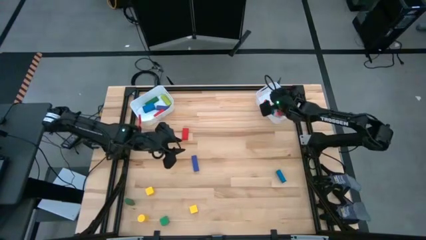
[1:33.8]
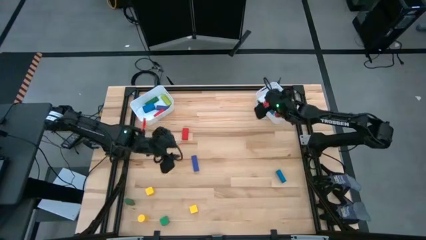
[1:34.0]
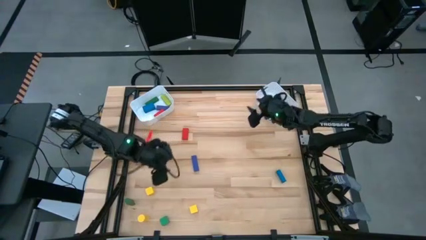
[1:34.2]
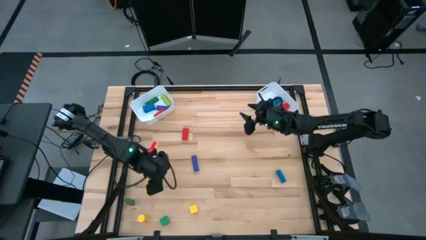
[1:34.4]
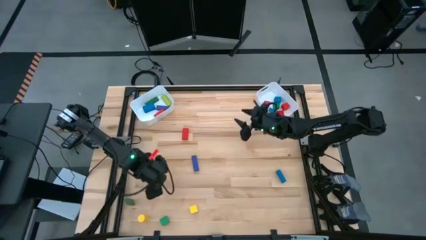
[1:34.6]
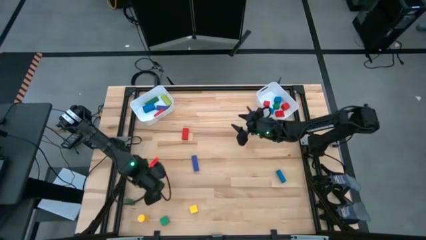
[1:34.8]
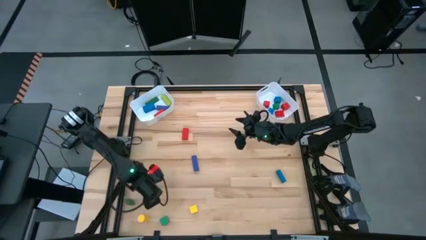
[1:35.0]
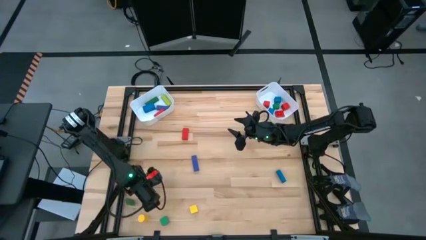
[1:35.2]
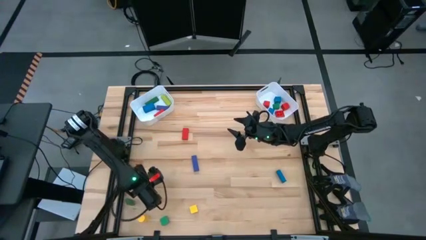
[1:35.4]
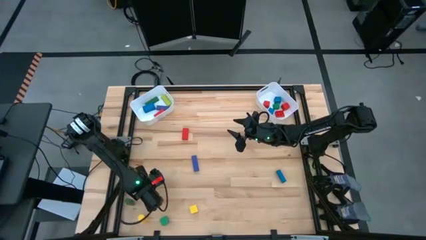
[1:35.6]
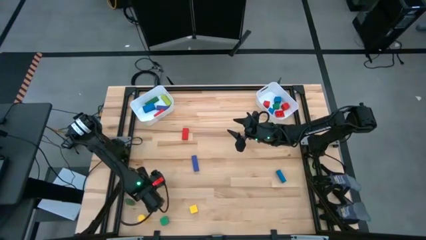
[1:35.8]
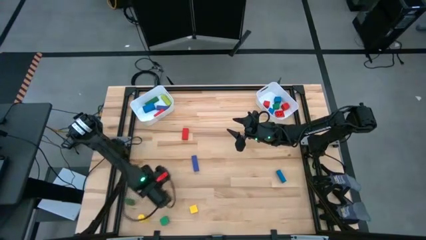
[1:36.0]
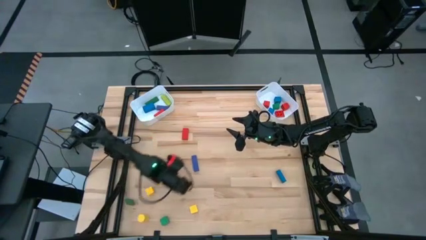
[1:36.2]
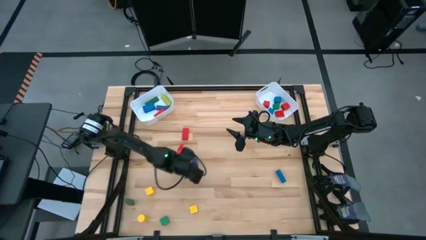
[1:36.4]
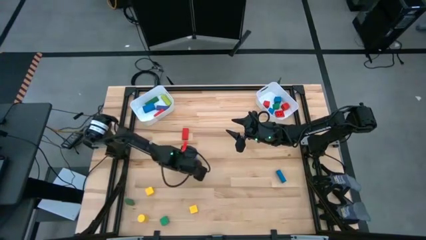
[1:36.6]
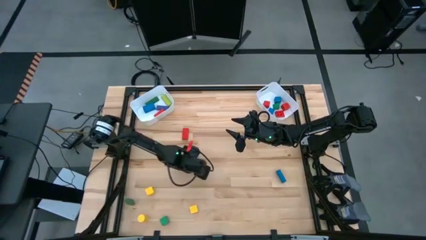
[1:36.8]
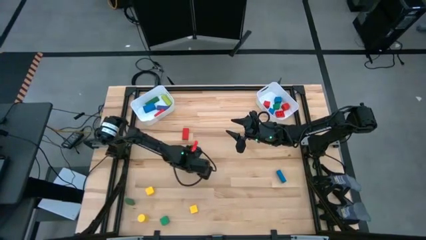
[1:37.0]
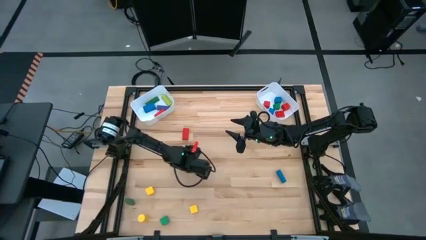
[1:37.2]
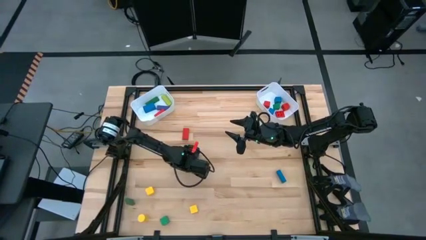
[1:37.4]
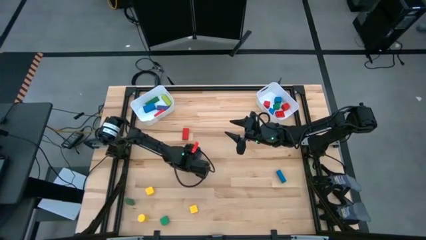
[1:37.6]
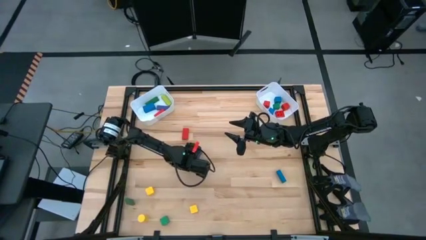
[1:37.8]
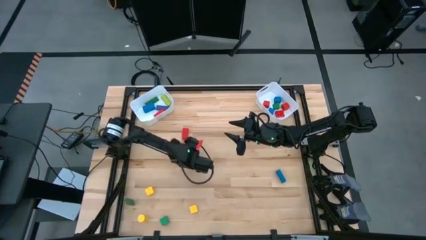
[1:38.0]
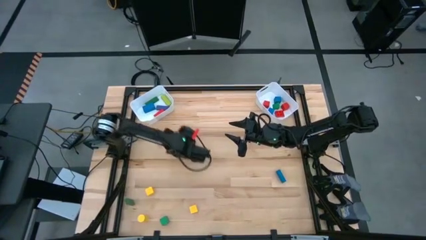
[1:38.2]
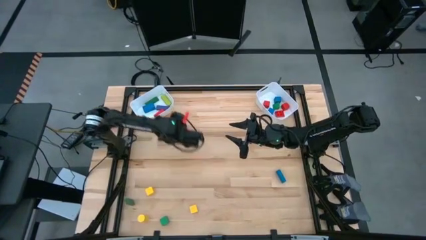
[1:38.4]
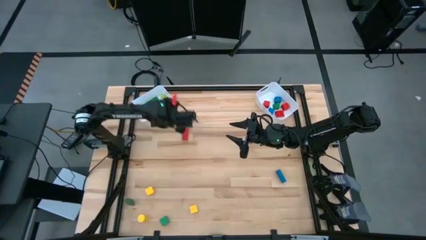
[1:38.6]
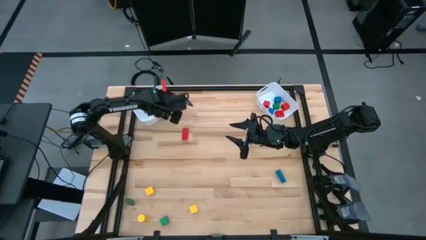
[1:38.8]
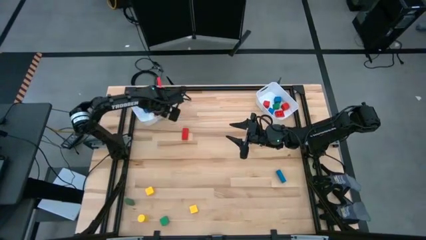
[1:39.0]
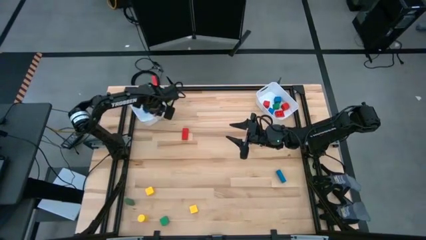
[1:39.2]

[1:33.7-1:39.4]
Task: Sort blocks by size
Put the large violet block into the left white bin

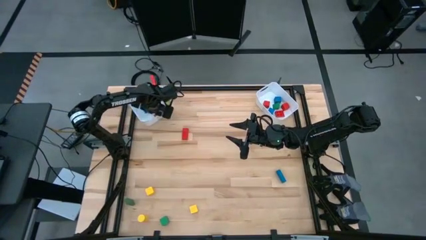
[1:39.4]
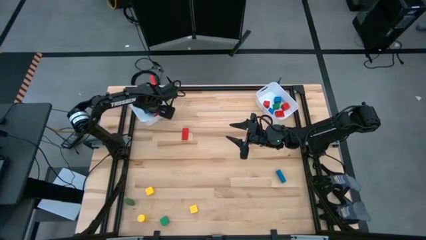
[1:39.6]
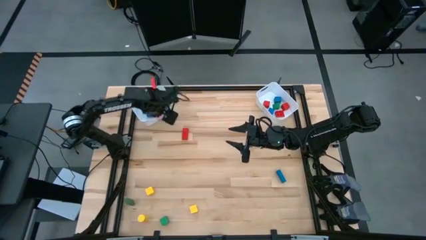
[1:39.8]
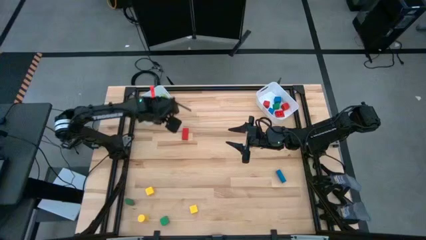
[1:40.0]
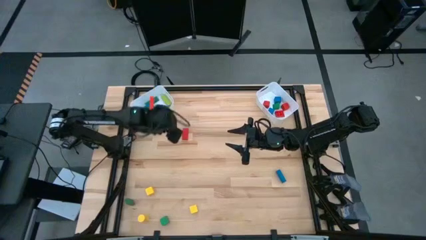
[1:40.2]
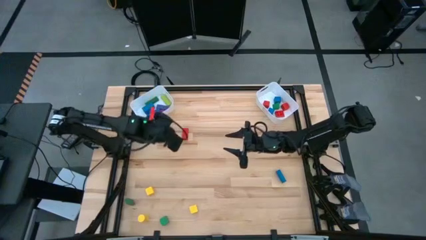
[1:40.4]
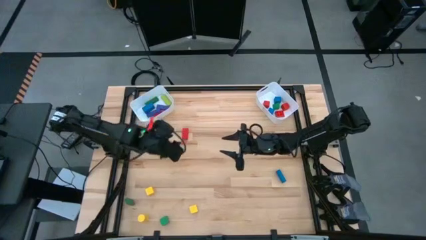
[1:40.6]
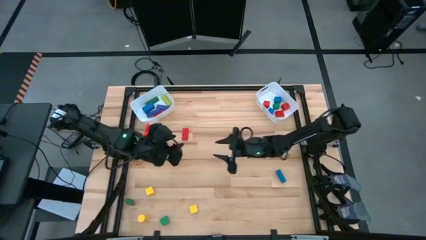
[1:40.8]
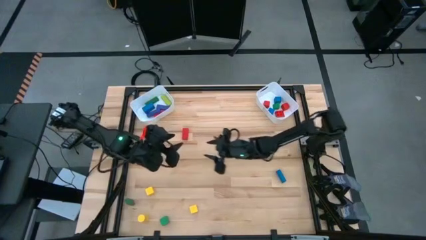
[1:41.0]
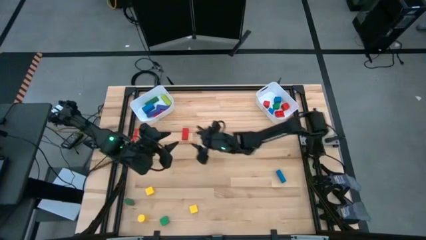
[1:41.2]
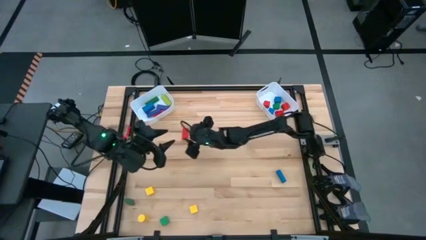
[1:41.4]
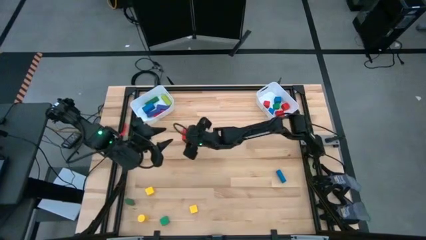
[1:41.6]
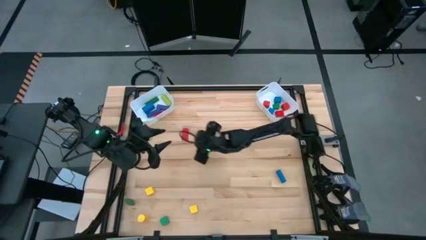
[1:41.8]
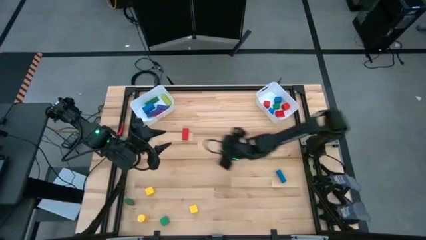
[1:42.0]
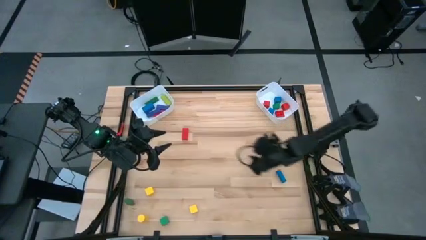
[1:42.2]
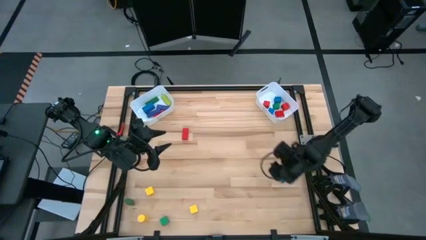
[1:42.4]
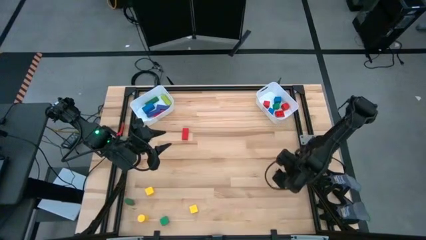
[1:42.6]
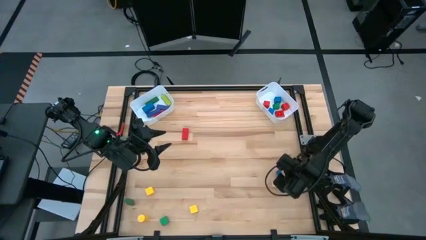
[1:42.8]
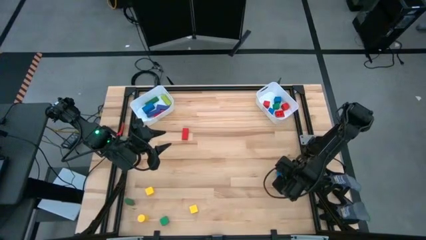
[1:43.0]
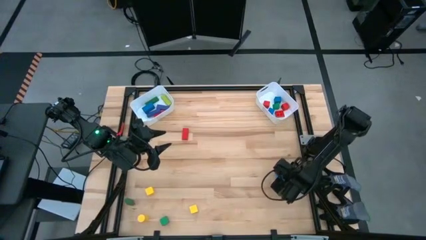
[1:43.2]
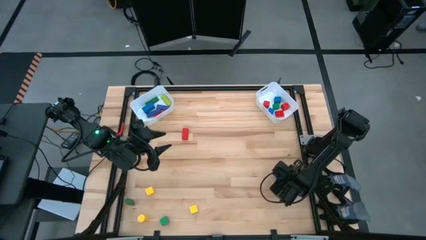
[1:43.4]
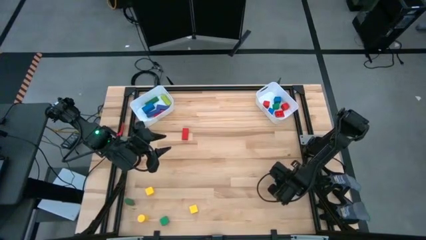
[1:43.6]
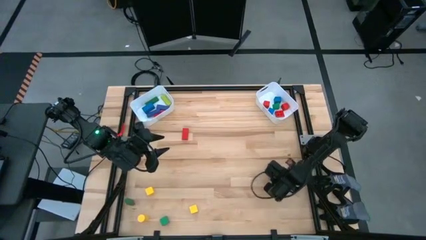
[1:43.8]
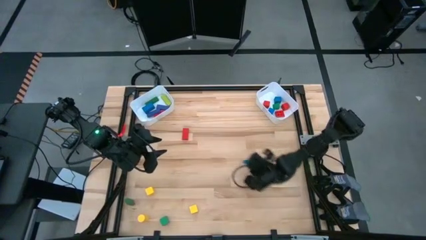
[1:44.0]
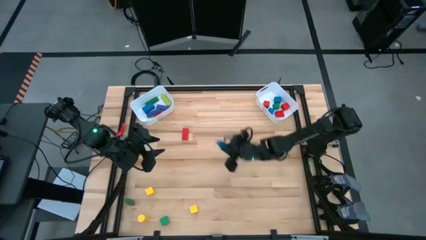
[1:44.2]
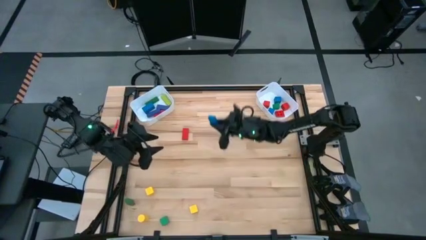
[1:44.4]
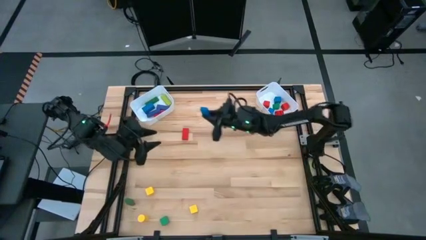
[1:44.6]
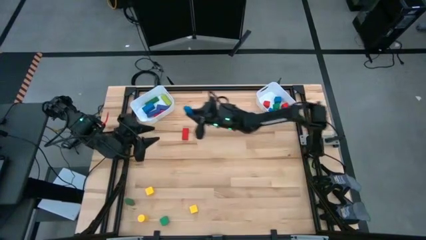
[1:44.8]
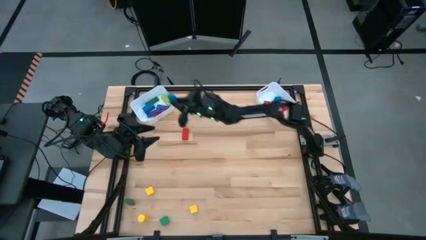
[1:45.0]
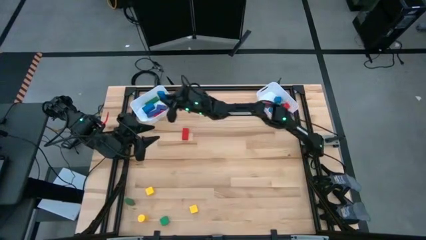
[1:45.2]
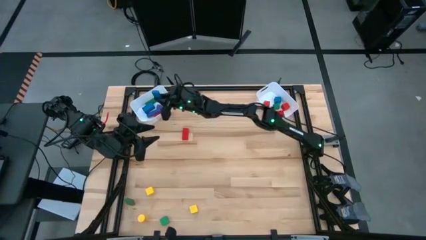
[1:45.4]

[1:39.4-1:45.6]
Put the large blue block into the left white bin

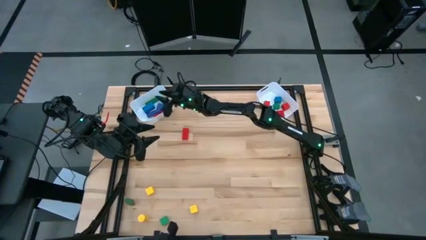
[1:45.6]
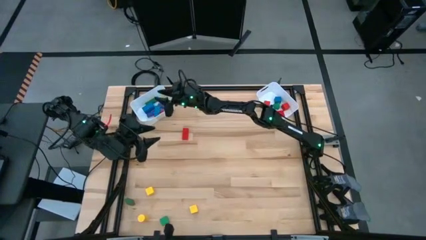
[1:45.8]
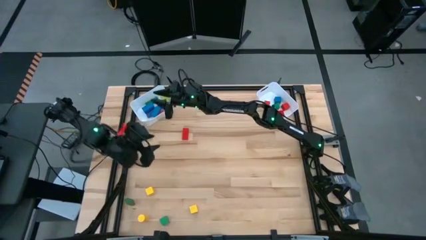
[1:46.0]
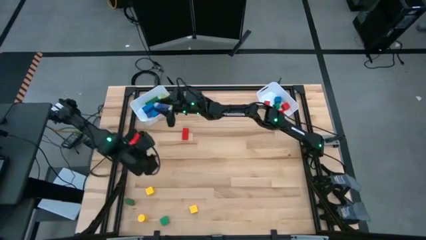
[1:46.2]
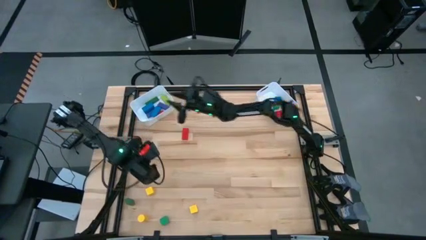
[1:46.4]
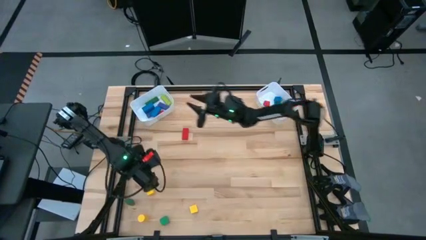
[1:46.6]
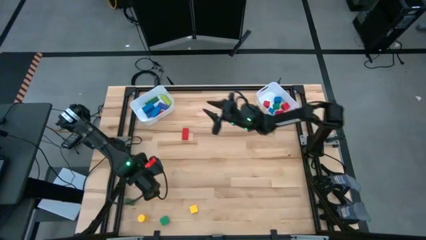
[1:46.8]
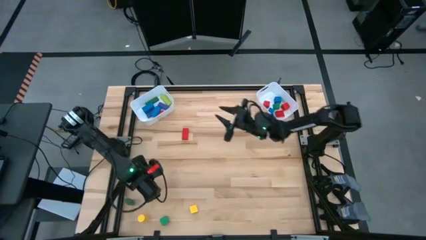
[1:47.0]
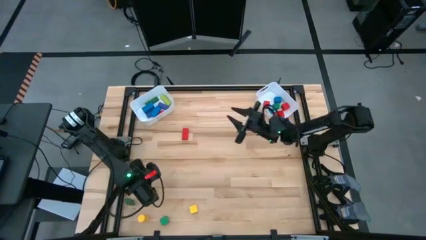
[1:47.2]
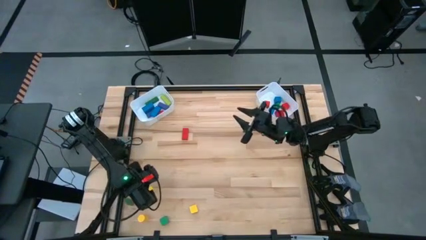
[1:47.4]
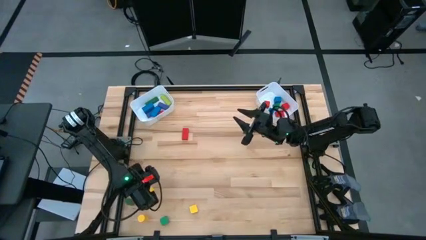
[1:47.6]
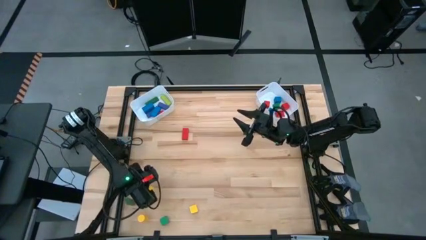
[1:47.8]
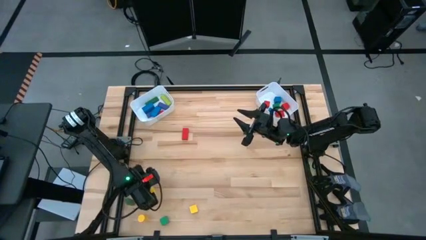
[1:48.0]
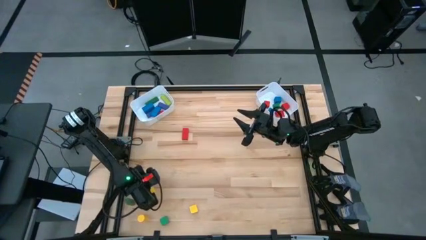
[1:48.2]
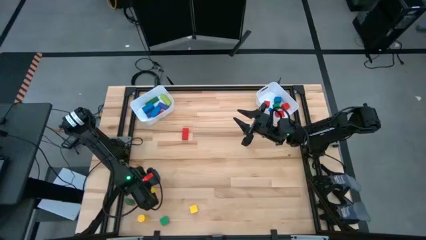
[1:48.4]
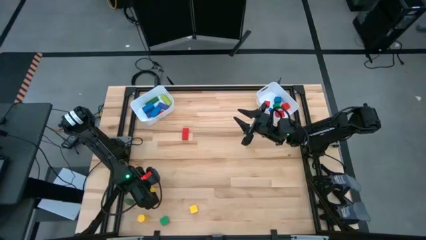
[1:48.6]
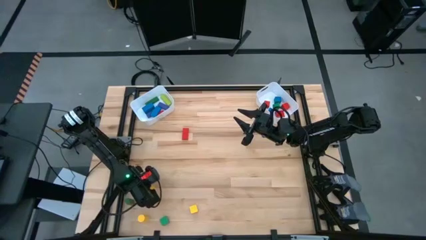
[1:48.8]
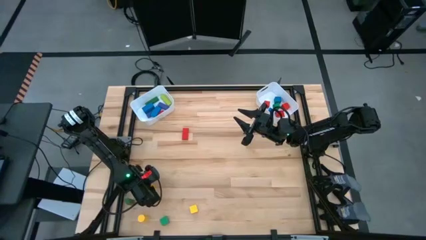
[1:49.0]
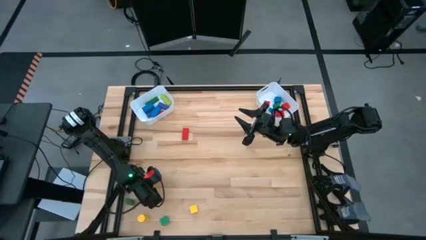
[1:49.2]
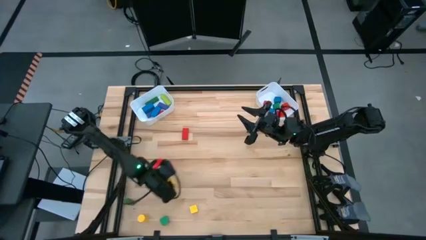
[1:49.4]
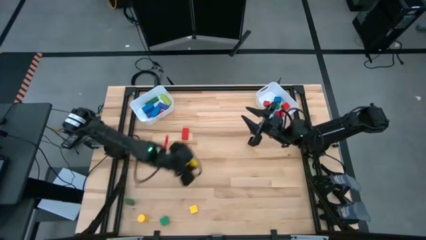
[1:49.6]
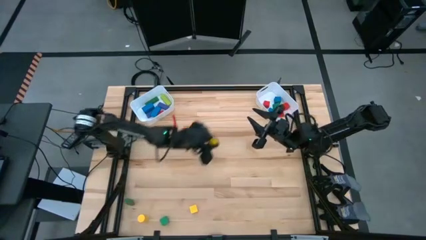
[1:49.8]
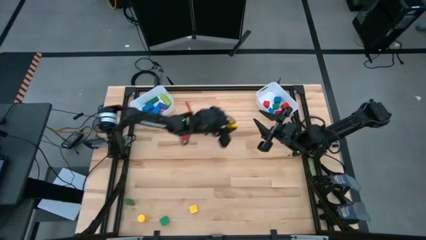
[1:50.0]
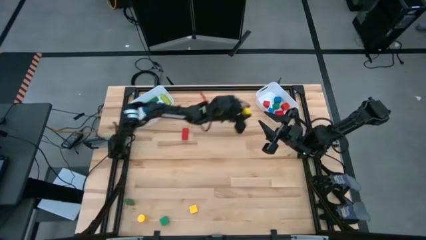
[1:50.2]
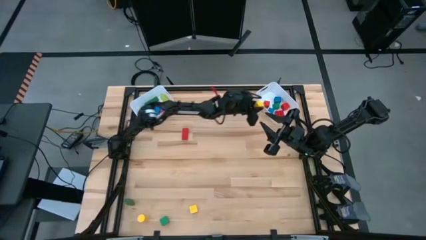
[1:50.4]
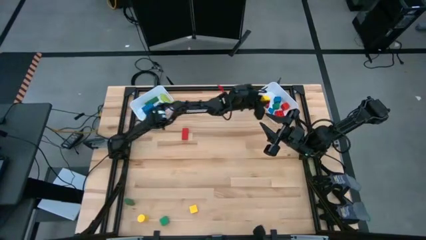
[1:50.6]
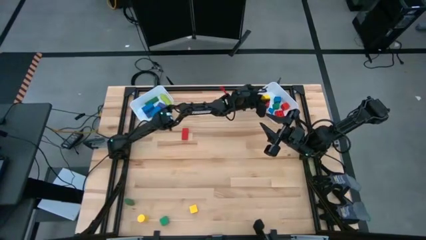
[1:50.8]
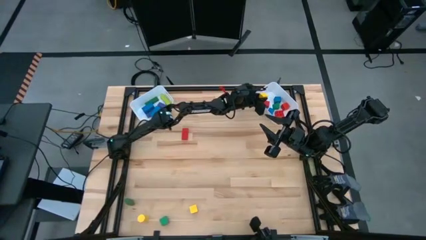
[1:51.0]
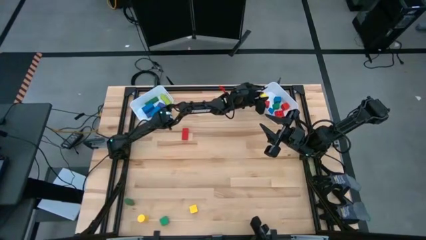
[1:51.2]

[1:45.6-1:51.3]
Put the small yellow block into the right white bin
